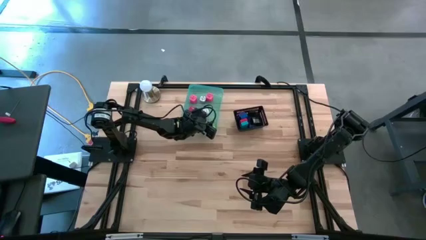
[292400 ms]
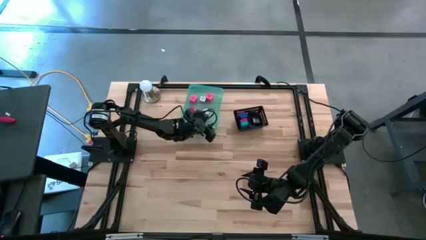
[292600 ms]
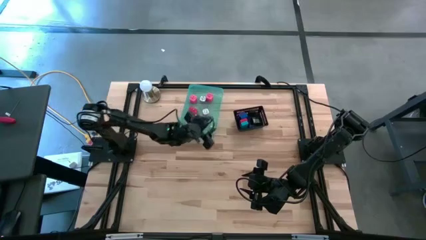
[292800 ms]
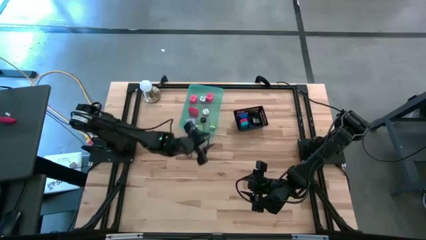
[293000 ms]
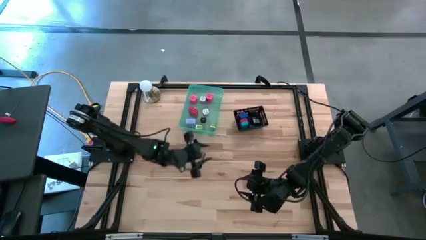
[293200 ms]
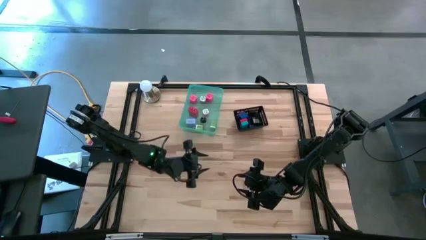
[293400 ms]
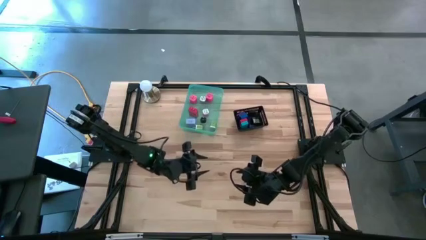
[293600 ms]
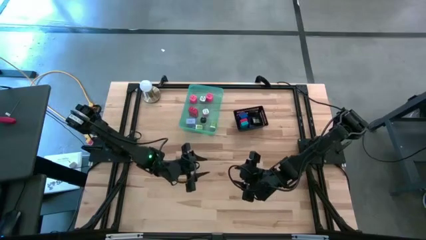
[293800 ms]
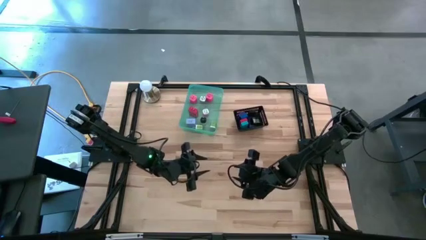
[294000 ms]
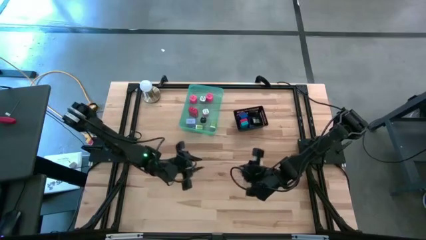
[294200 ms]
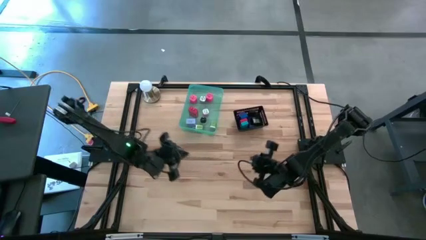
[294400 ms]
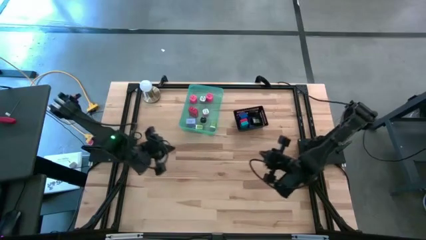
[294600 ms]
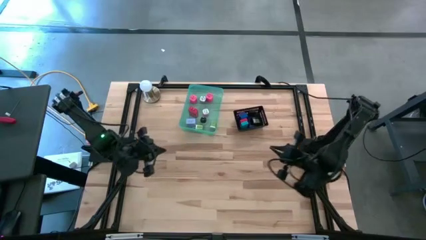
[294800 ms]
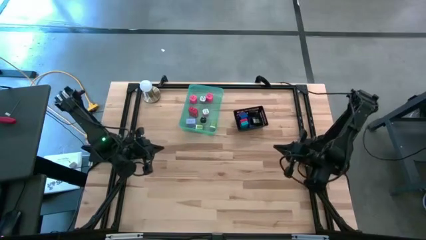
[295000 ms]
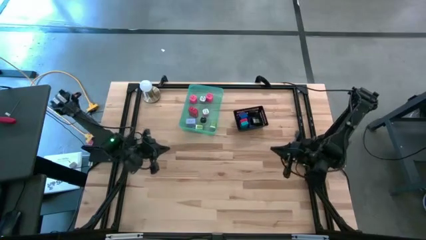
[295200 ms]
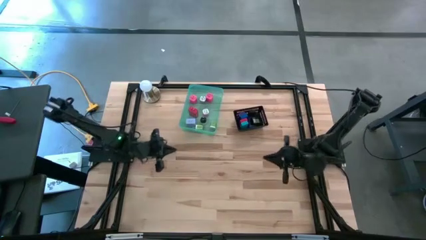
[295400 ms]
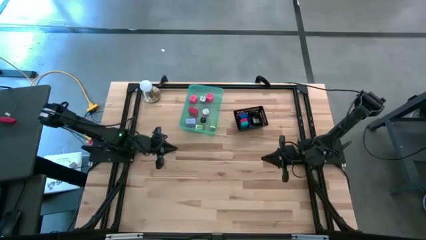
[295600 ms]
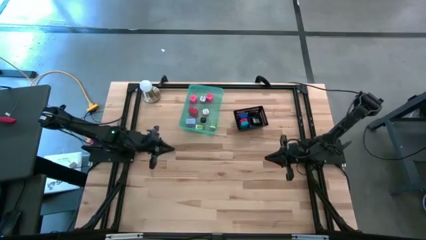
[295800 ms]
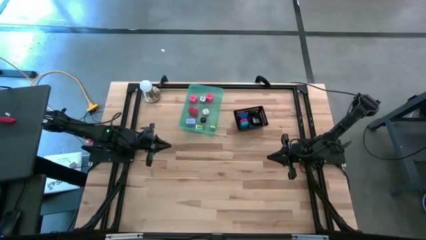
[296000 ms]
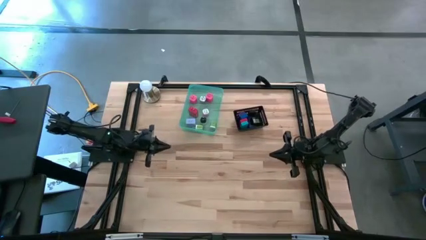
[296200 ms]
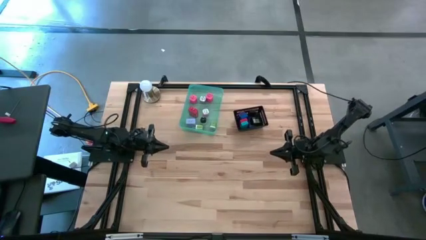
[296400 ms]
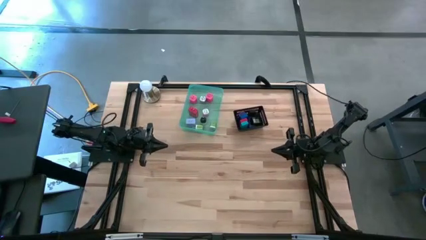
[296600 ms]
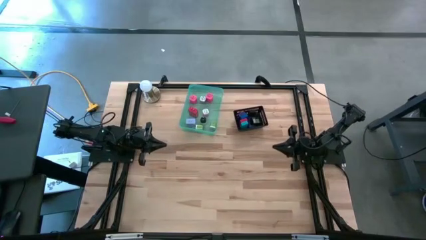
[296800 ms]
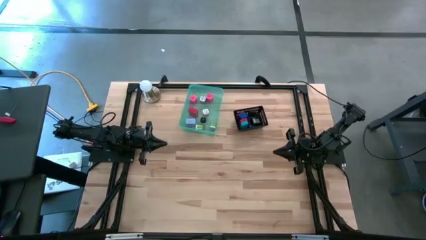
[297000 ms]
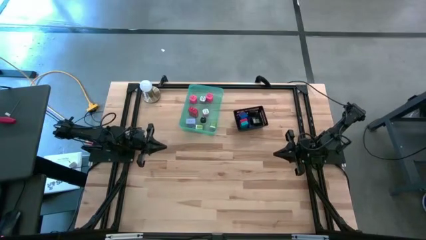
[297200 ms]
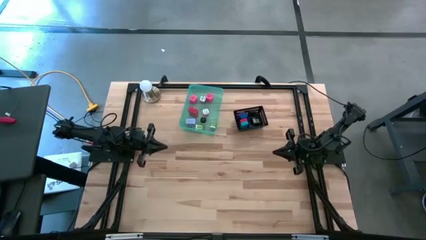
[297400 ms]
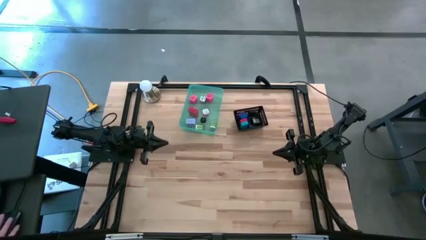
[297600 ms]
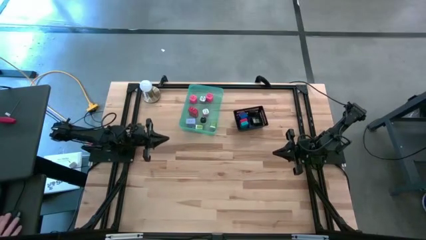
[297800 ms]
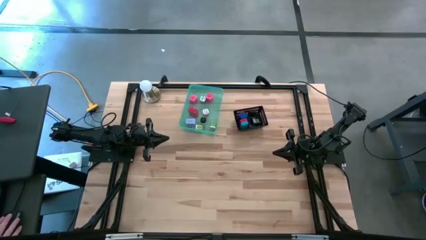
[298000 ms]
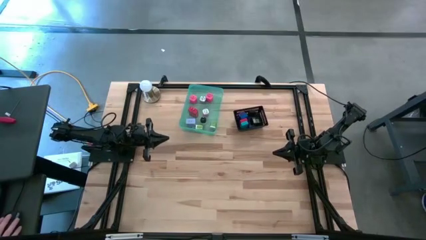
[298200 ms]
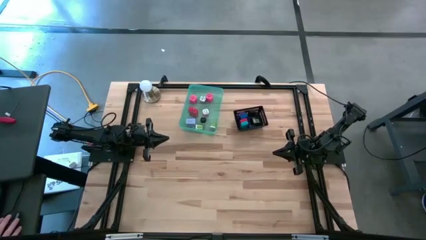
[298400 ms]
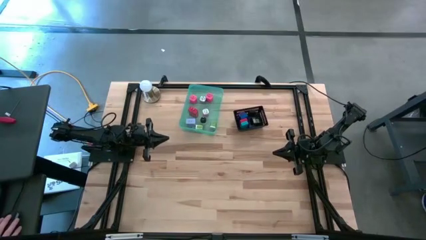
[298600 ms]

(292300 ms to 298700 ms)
Task: Pick & Place Office items
Return to Home Position

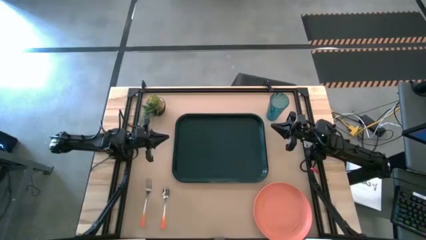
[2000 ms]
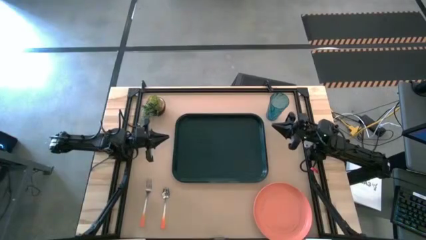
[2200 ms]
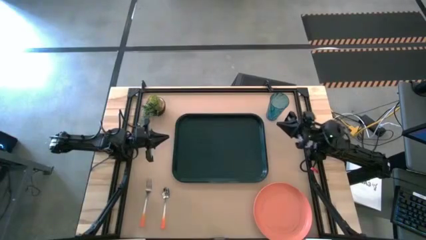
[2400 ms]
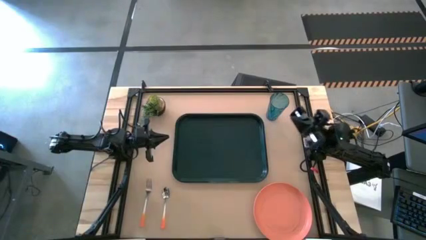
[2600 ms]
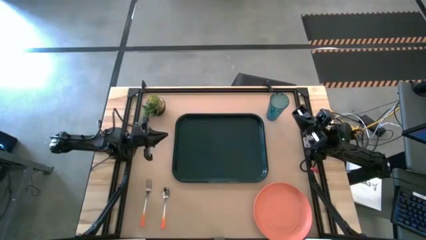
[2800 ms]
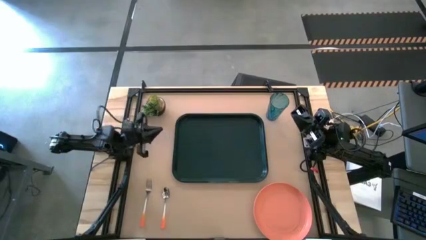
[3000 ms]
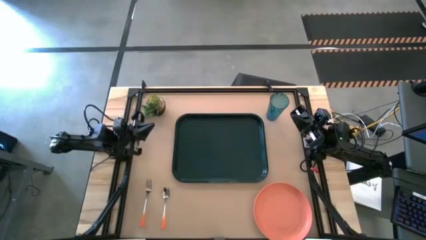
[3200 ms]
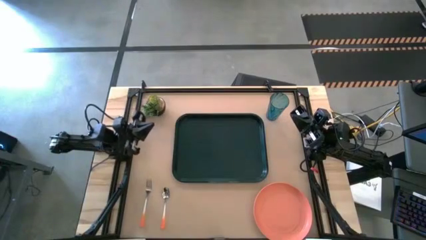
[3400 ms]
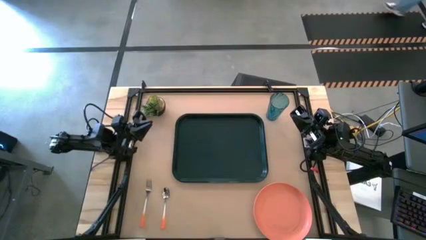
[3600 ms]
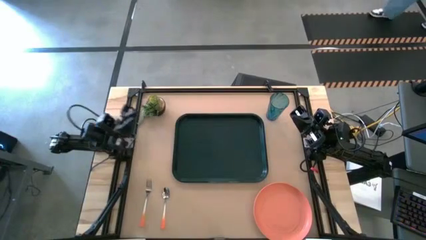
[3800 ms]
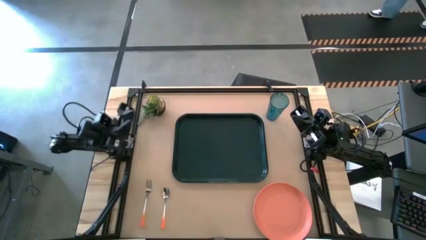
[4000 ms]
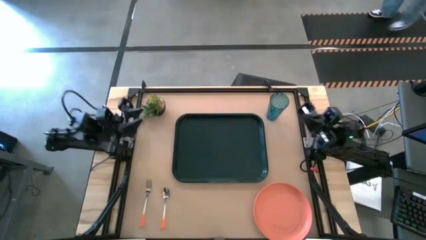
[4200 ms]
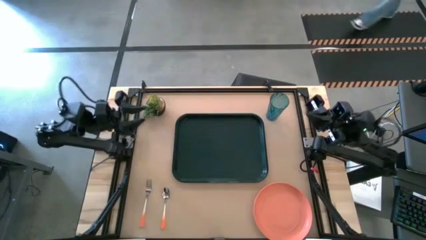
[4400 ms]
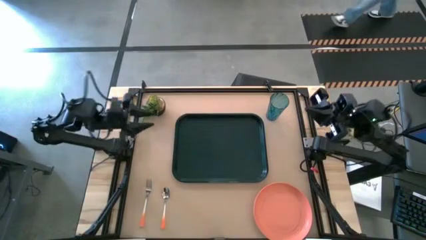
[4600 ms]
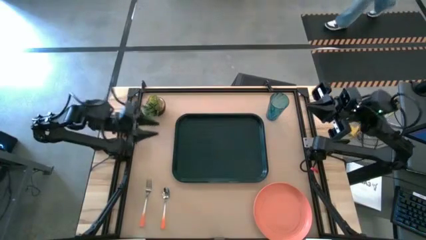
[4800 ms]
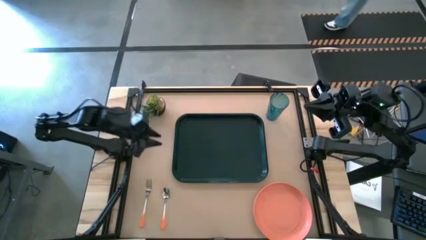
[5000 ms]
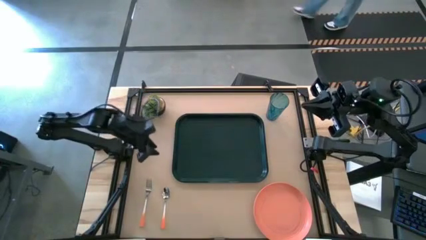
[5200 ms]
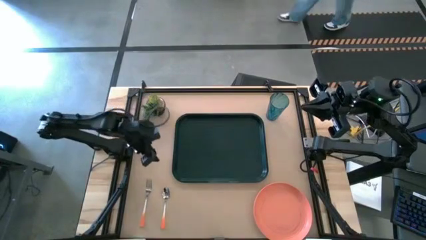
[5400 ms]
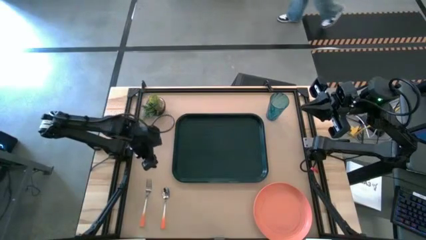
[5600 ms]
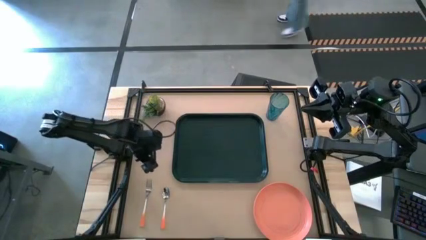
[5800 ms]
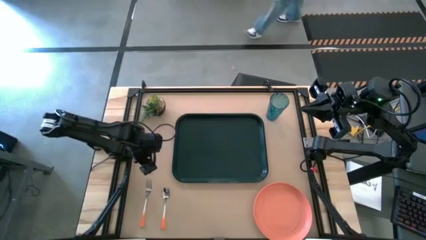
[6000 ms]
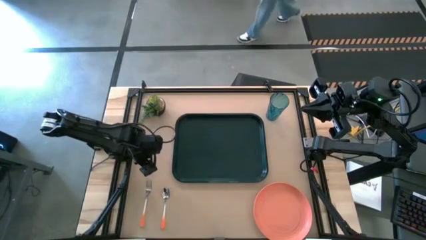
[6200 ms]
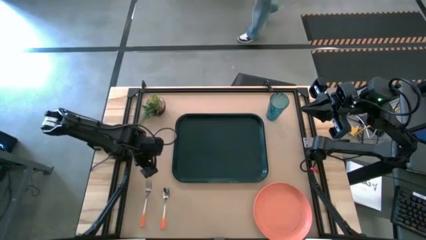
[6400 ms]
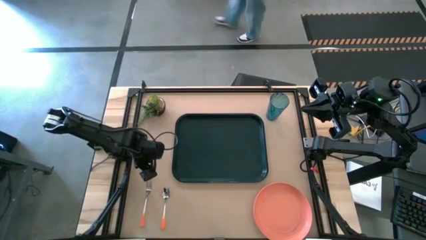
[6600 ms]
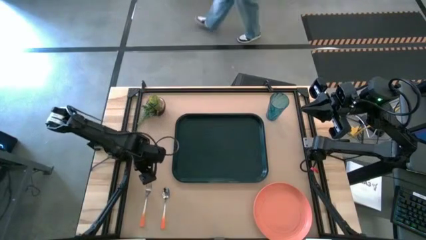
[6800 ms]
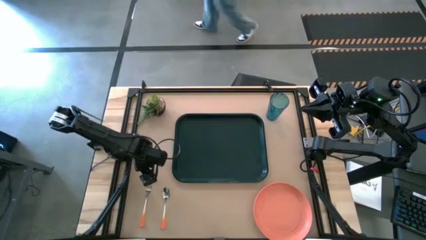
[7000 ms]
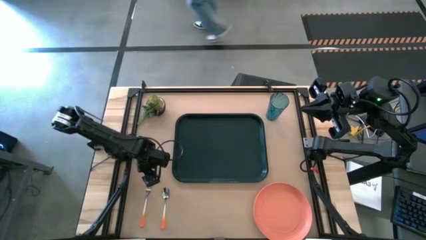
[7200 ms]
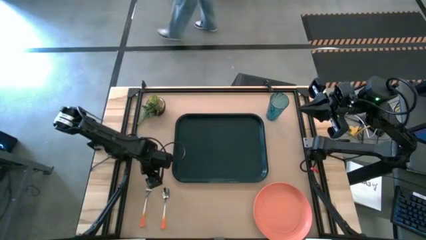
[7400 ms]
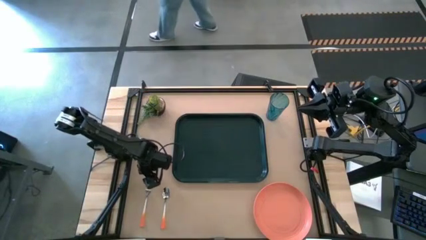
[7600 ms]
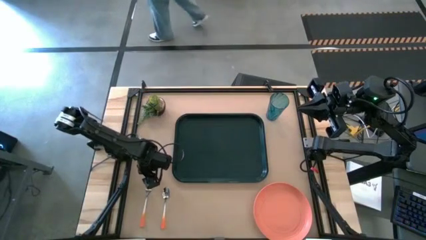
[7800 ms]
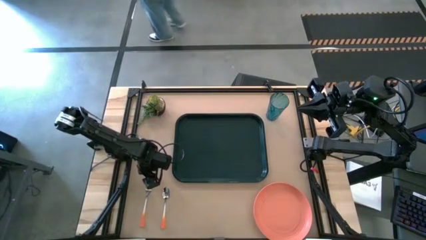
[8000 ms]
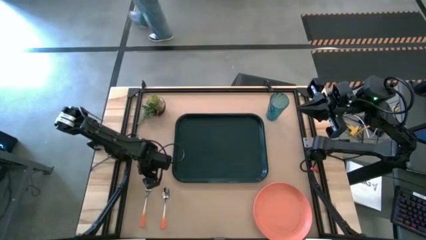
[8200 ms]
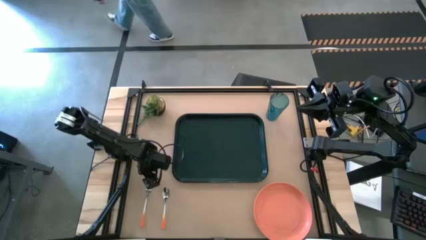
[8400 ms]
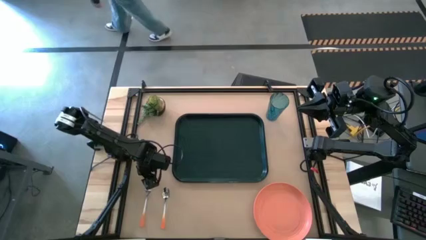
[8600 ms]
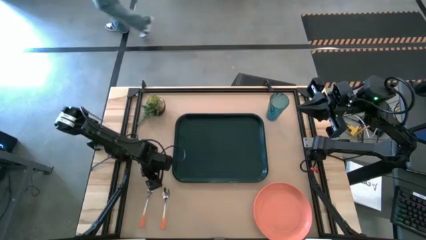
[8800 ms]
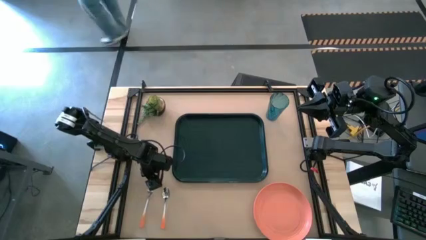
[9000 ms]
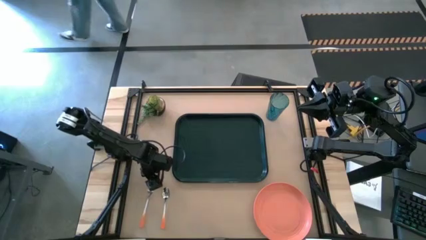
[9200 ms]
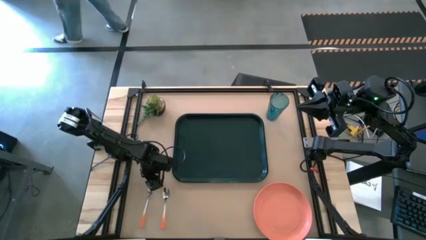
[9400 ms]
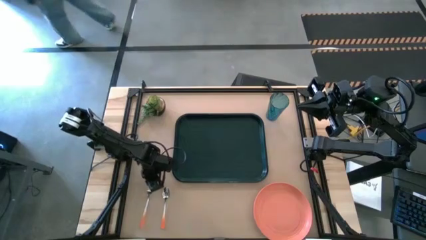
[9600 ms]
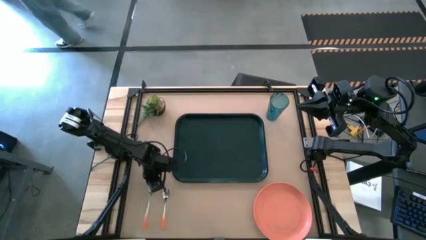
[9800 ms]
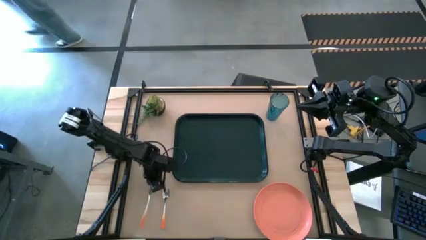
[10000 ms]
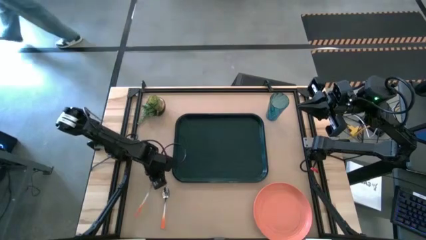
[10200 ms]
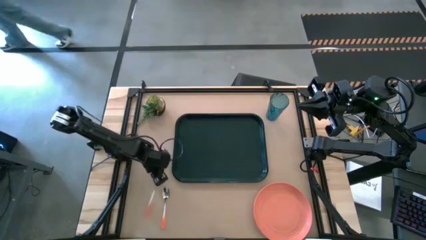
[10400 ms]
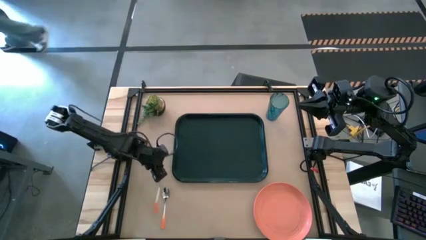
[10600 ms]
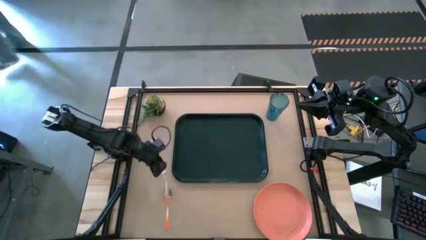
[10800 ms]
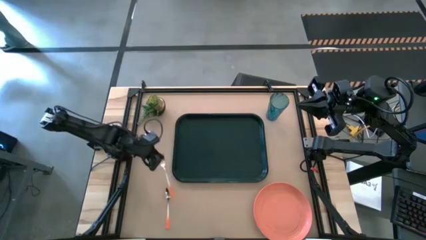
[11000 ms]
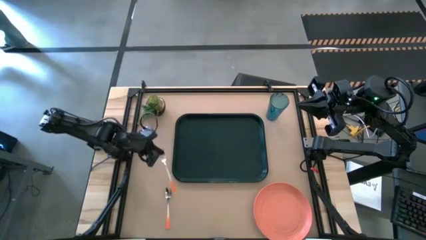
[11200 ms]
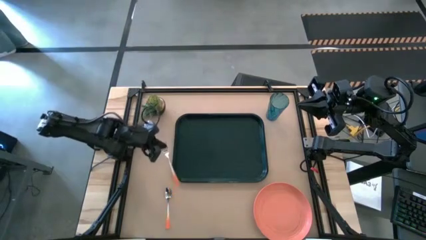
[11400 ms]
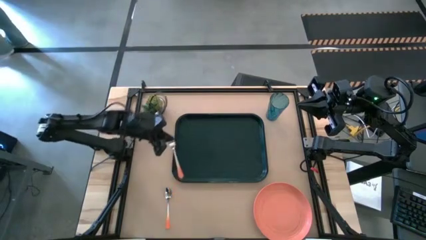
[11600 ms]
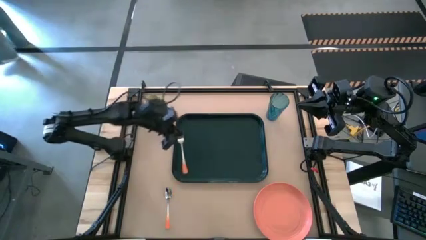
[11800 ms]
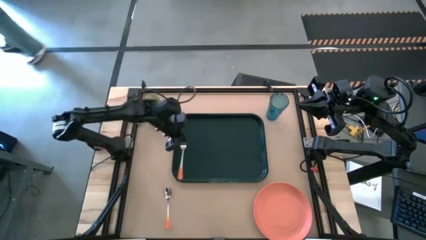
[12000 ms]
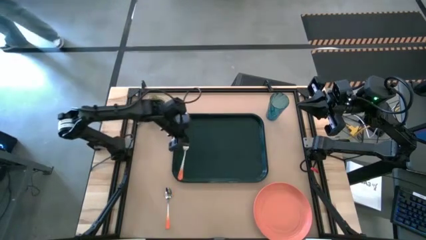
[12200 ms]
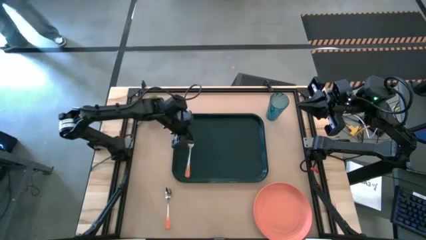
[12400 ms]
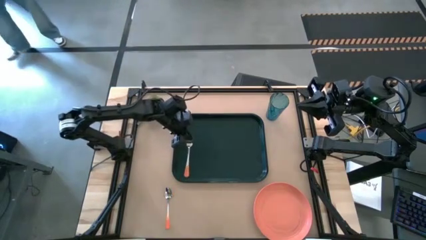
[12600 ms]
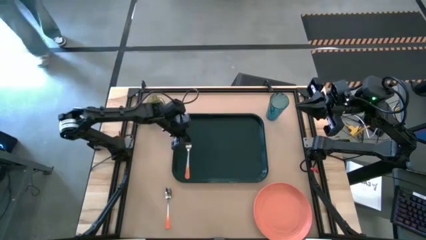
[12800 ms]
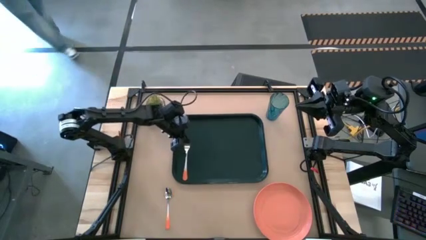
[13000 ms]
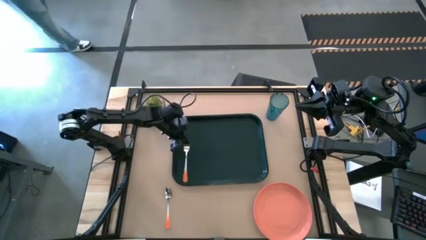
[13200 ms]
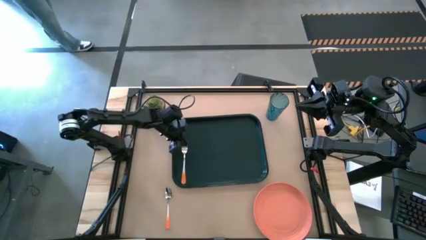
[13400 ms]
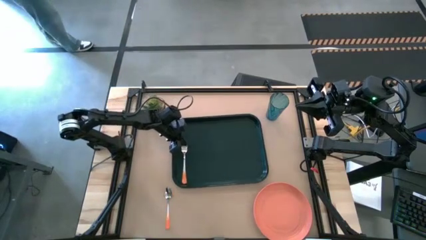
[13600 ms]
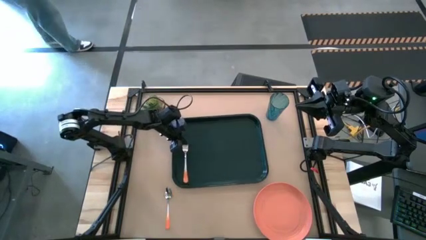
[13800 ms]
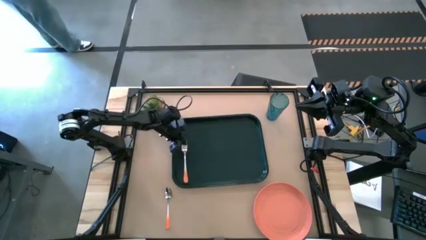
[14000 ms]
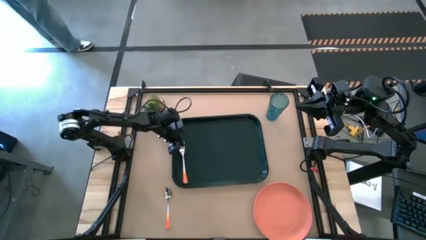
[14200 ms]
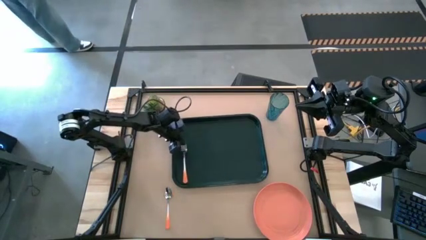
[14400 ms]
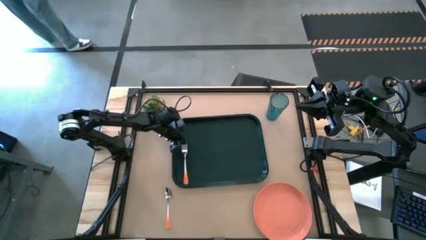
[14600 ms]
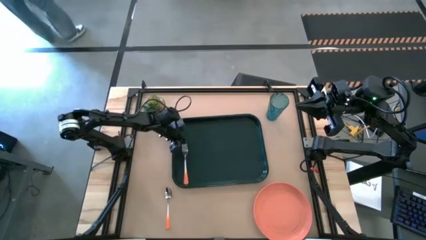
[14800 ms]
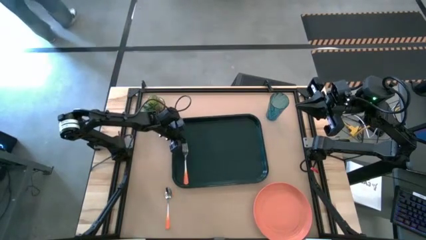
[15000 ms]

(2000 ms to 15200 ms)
Task: Pick and place plate/cup/fork/spoon on tray
Put the orange fork on the left of the black serving tray
